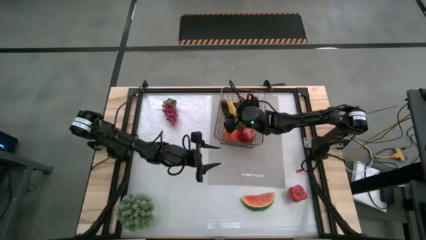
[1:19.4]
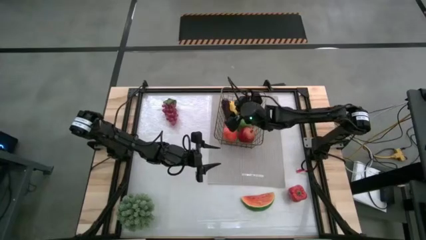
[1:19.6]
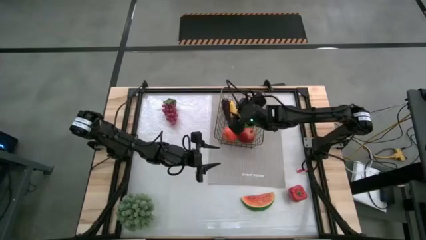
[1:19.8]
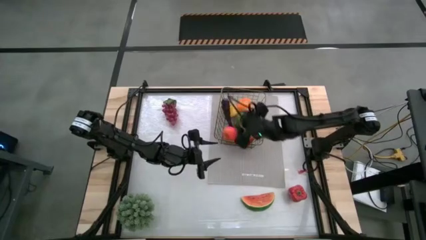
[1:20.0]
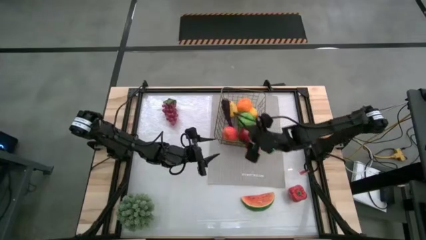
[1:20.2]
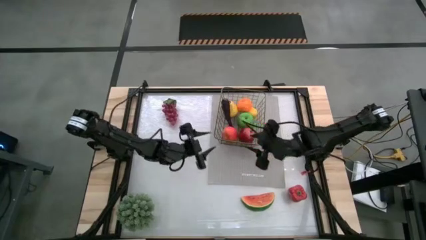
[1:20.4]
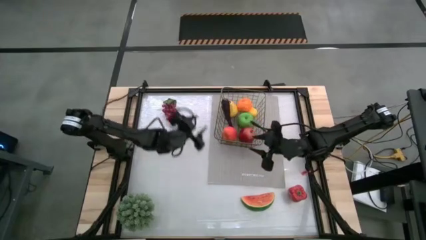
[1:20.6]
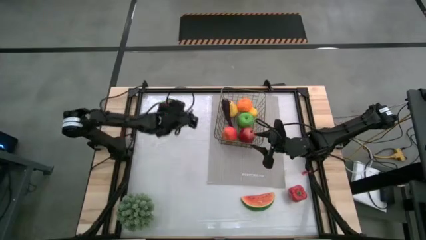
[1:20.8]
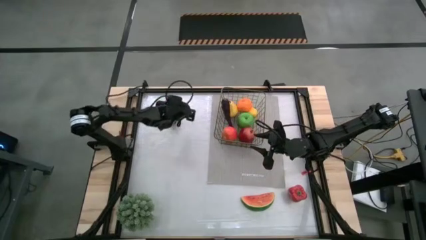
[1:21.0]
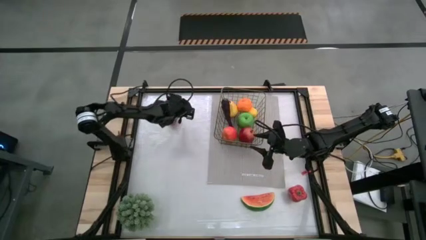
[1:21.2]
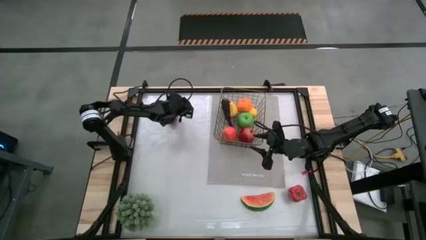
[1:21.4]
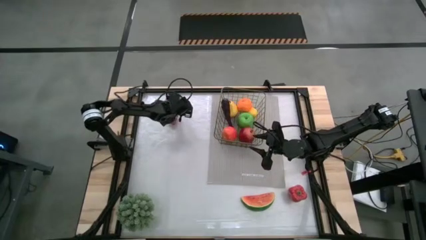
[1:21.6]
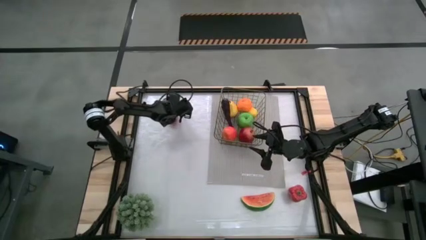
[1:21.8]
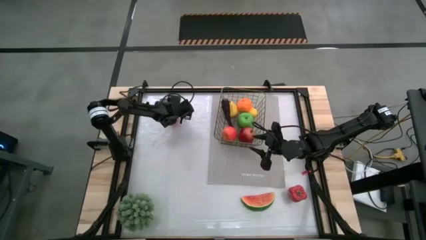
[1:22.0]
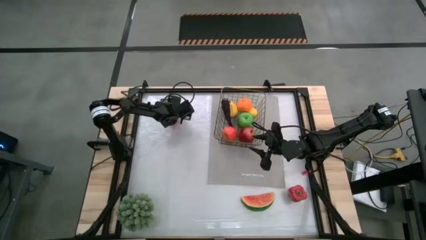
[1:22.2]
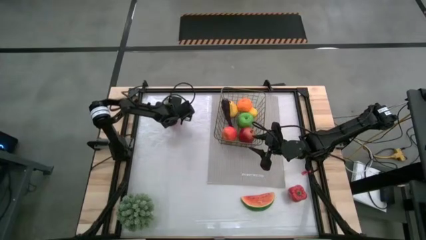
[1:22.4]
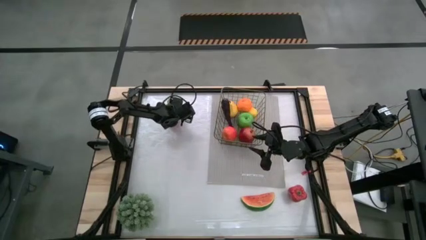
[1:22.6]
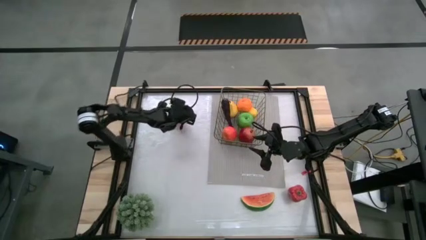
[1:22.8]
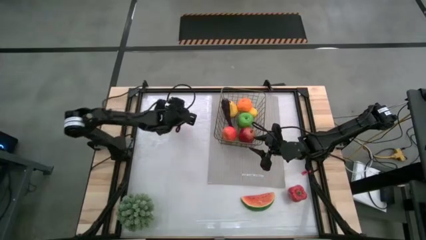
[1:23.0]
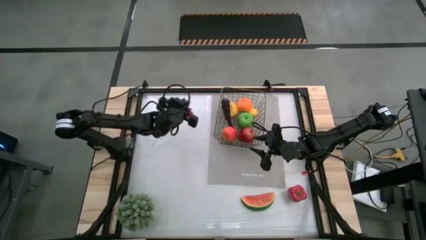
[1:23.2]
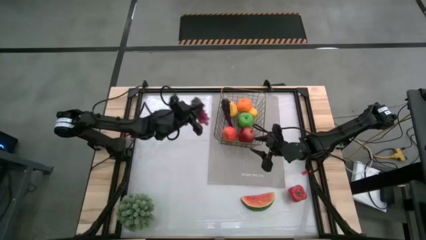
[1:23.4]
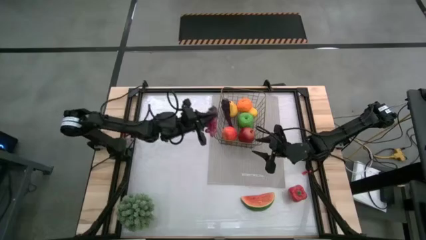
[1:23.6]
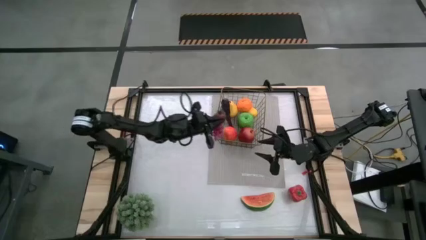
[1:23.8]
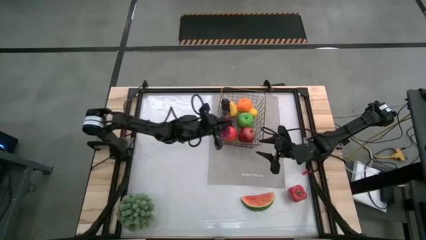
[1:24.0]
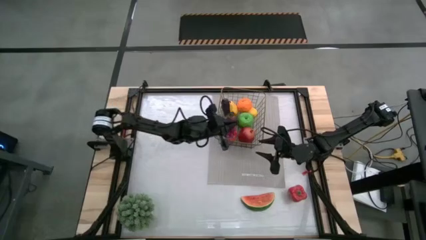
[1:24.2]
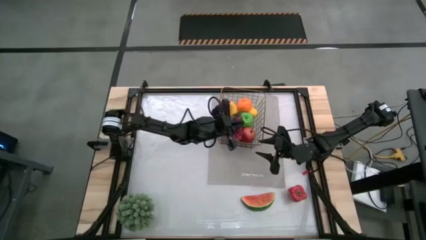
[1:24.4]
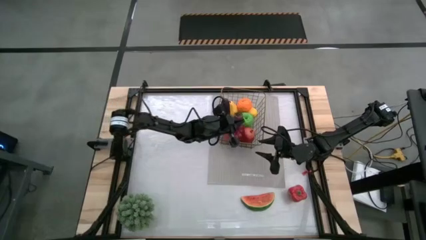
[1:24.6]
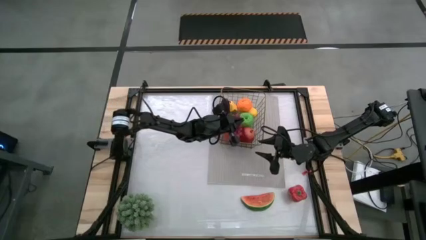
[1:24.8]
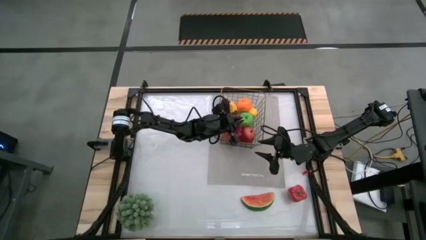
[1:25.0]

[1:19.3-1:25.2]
Task: Build produce basket
Put the grapes into the wire basket

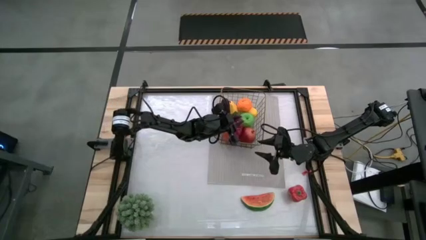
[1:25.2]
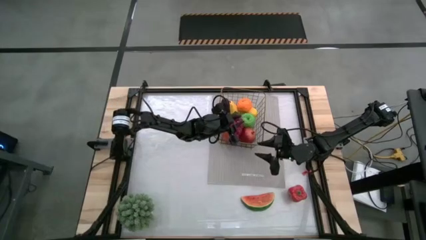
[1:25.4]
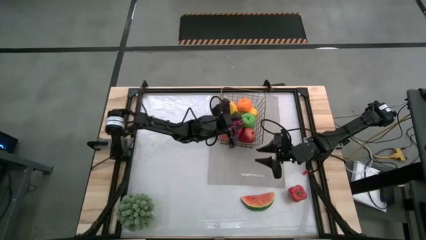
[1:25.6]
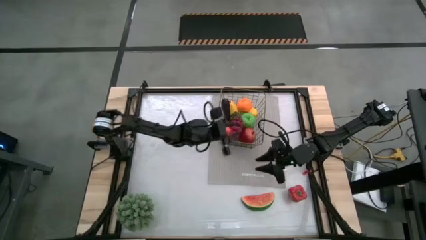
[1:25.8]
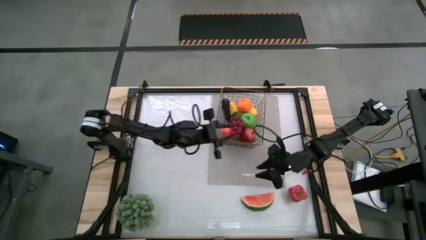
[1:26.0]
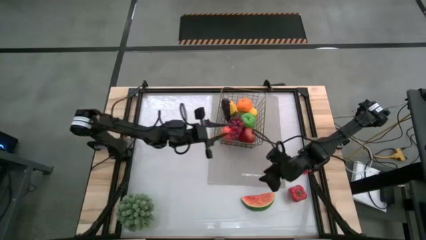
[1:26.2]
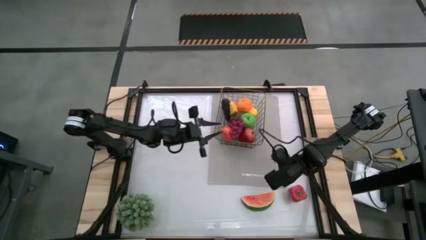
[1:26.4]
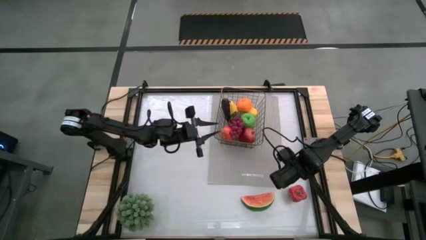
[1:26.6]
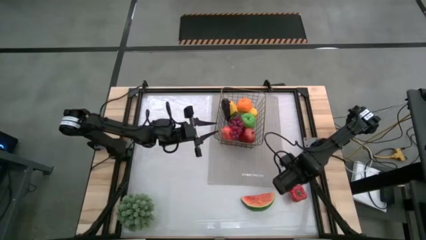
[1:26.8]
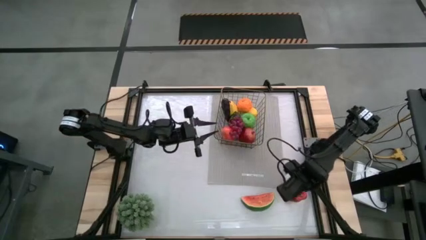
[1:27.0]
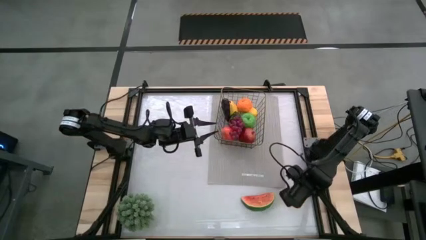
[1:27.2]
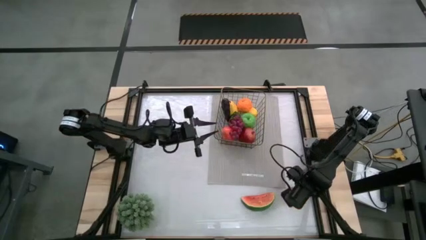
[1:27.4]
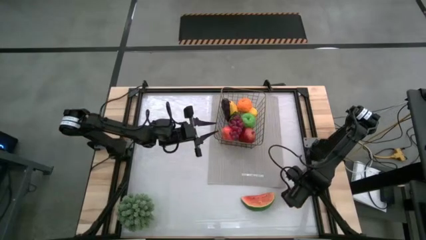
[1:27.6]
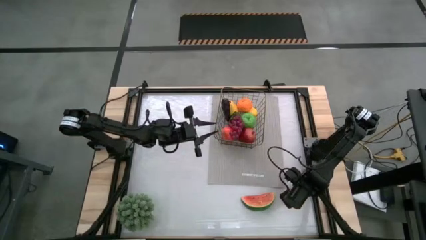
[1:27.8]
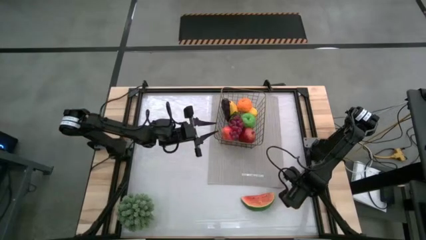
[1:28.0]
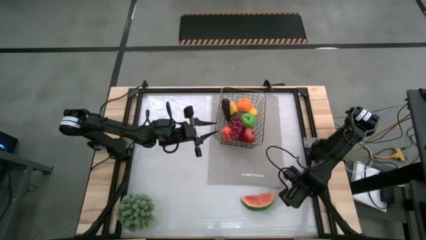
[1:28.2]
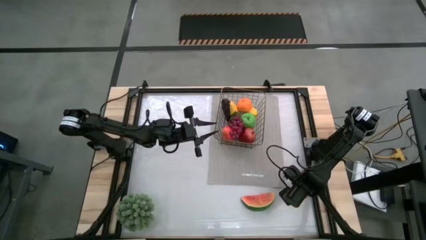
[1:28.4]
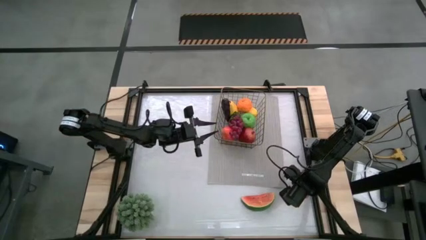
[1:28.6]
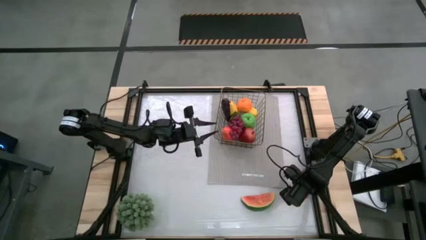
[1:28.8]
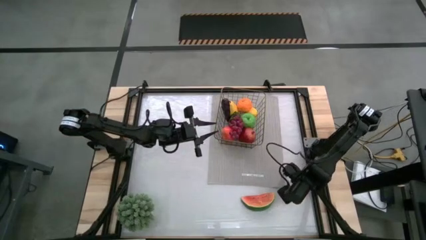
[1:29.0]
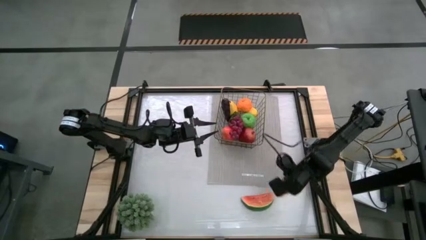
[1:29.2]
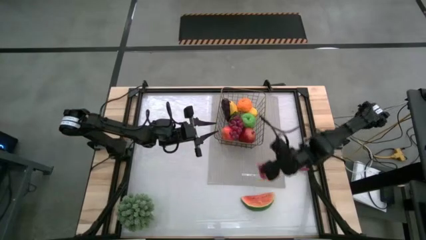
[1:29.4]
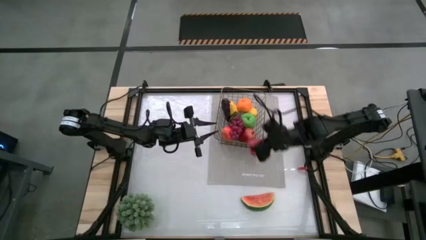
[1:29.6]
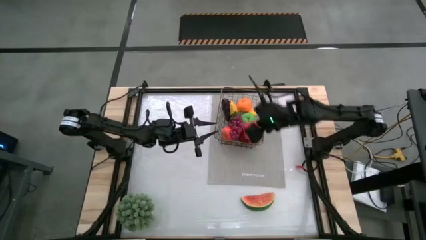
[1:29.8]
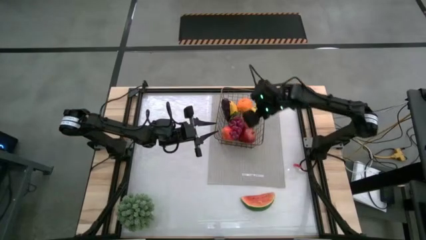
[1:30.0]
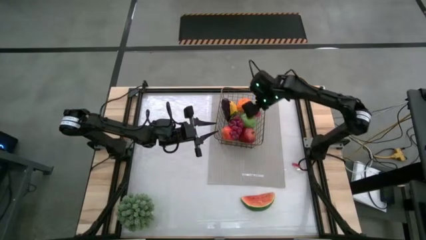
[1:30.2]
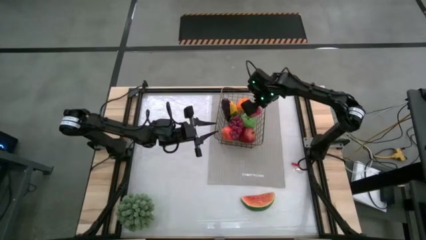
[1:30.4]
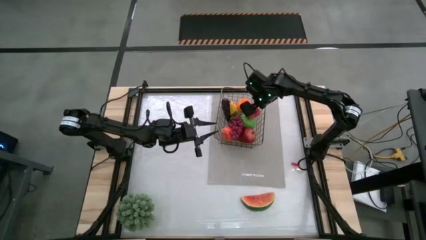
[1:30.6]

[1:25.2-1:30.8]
Put the bell pepper into the wire basket

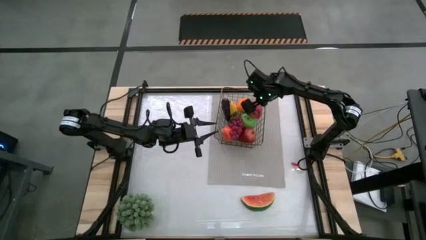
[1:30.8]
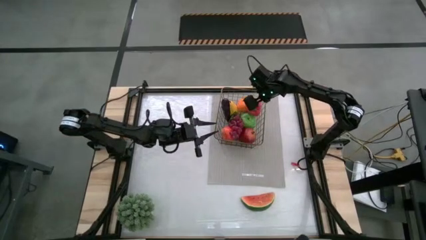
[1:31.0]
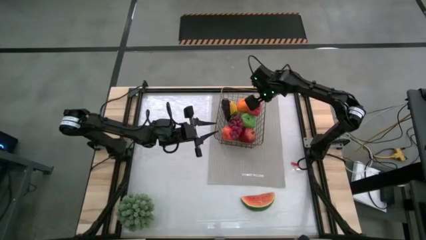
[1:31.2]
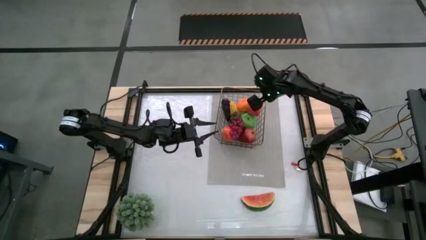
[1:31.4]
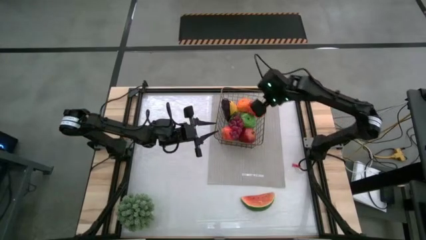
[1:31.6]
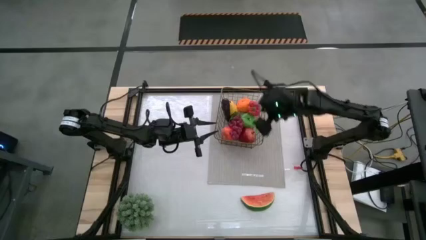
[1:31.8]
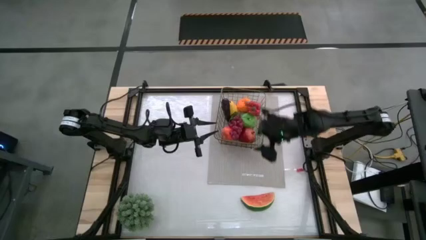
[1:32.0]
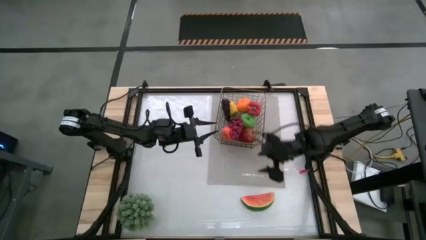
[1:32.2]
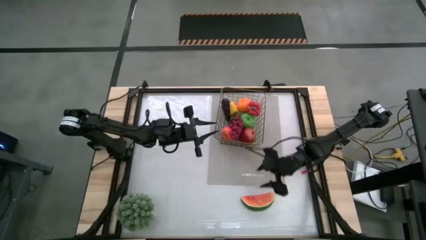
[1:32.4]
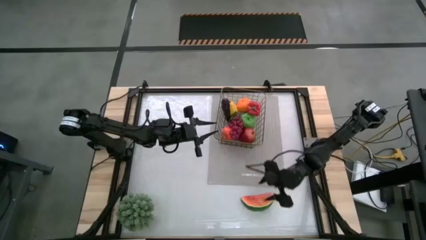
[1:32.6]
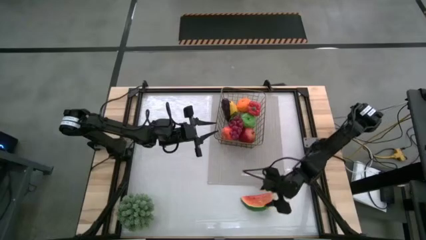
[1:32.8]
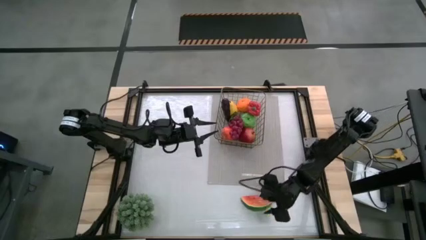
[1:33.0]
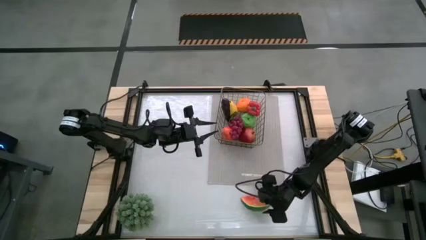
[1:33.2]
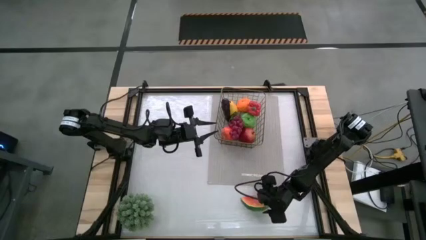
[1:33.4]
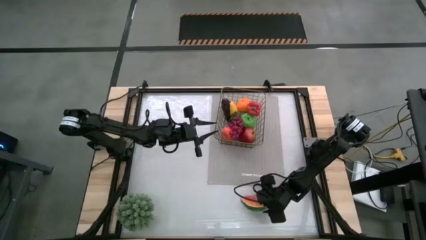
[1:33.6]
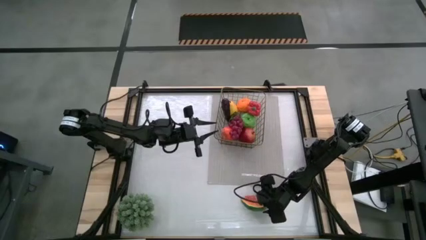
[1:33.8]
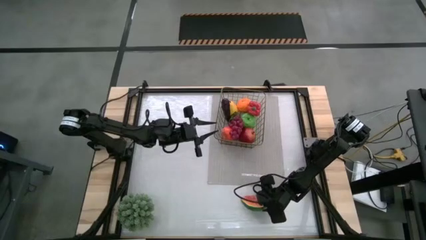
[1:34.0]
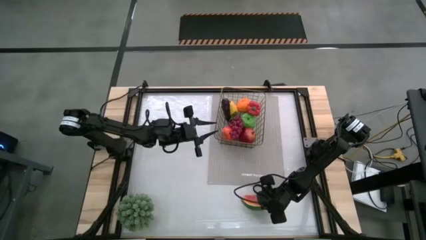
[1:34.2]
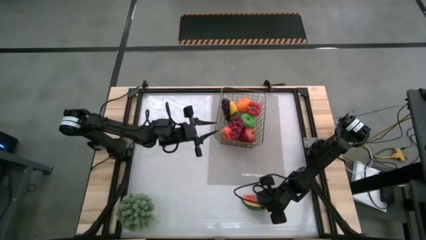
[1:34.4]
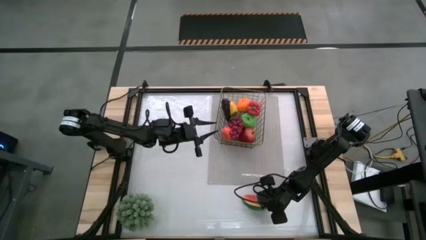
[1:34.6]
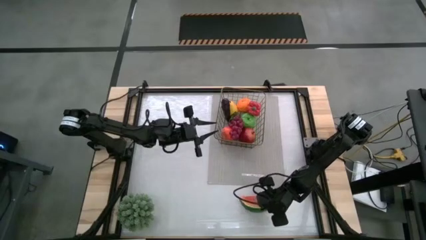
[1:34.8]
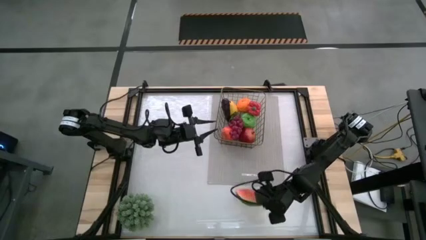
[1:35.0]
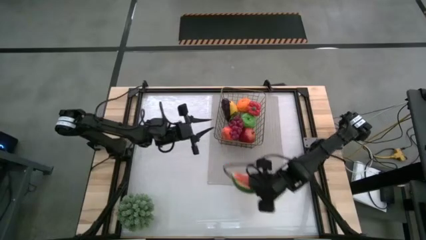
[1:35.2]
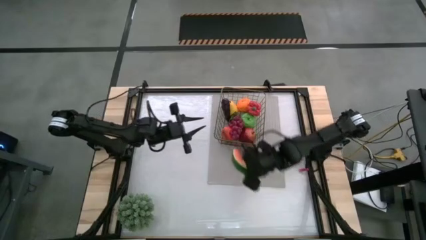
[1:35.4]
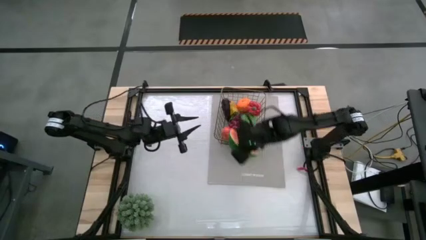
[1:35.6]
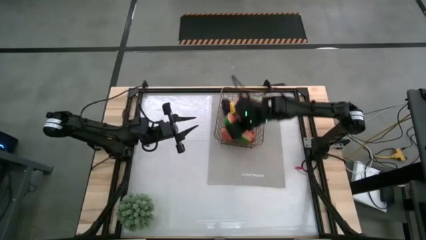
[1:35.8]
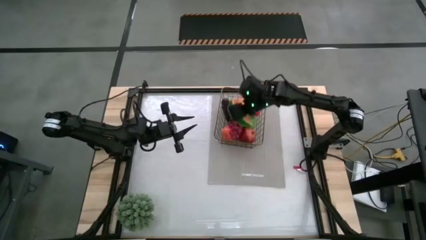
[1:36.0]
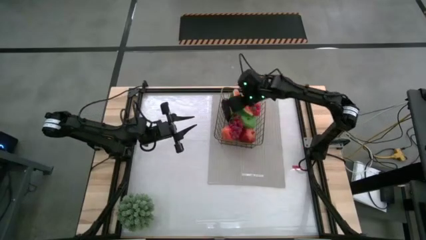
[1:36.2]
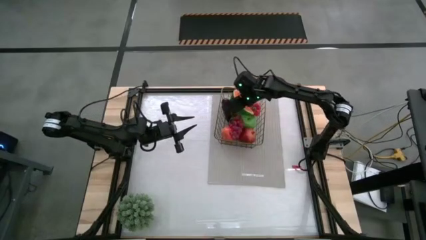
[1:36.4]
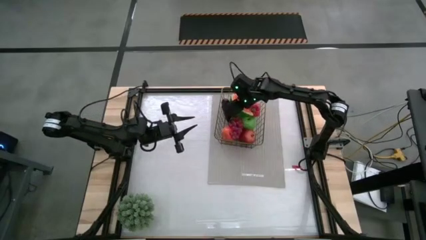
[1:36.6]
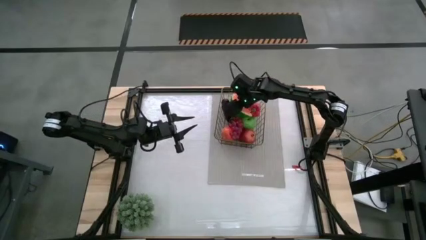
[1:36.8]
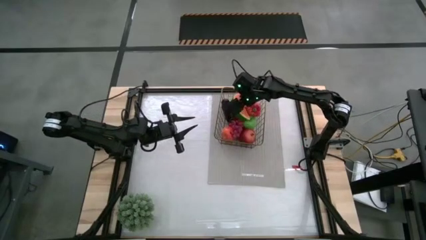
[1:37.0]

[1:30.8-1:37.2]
Put the watermelon into the wire basket
